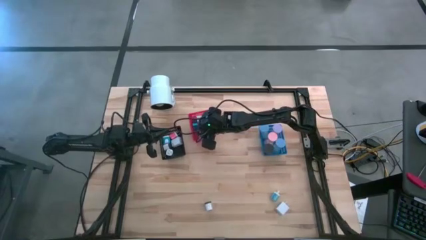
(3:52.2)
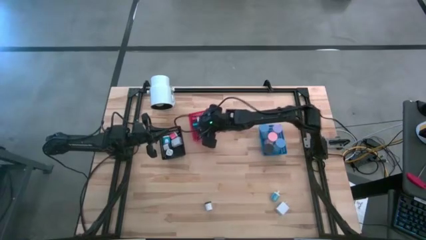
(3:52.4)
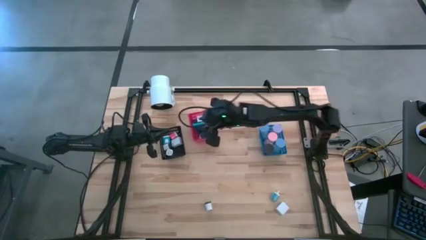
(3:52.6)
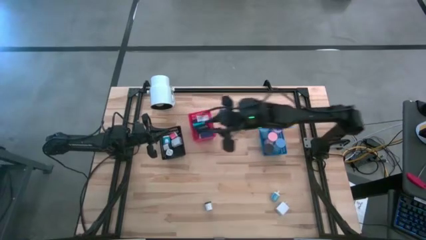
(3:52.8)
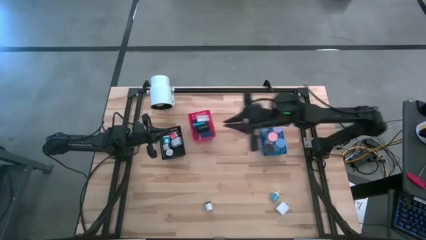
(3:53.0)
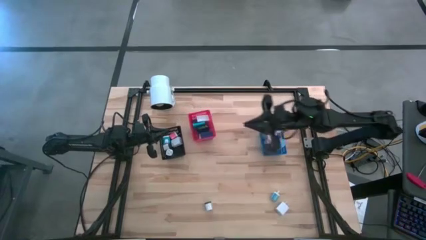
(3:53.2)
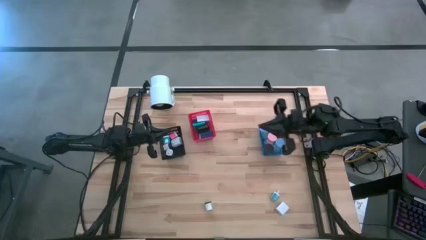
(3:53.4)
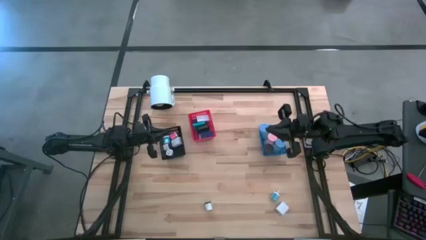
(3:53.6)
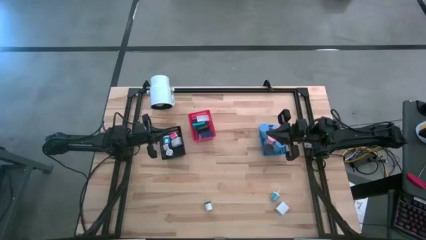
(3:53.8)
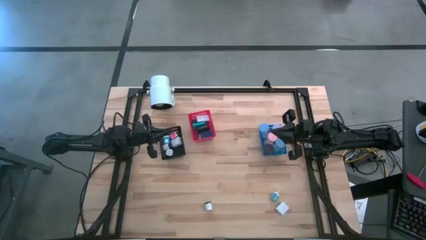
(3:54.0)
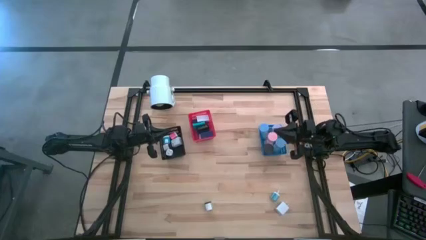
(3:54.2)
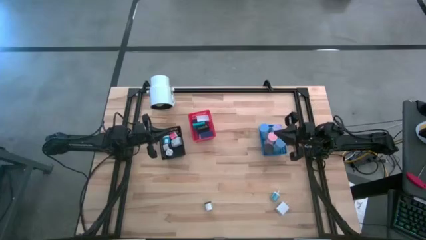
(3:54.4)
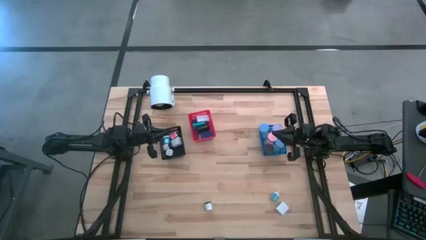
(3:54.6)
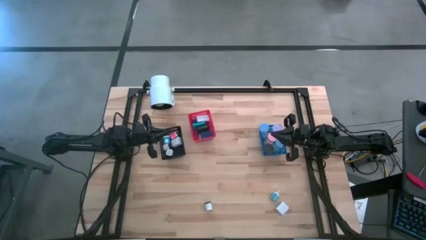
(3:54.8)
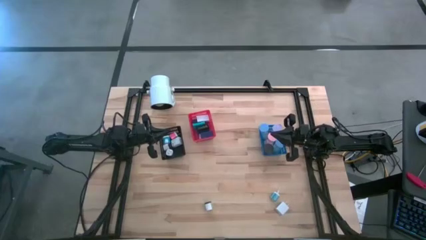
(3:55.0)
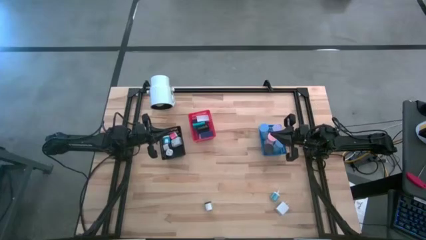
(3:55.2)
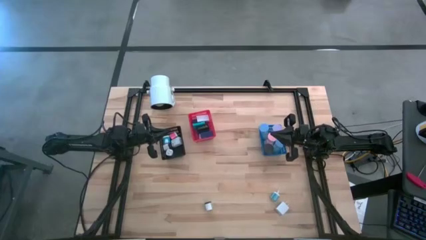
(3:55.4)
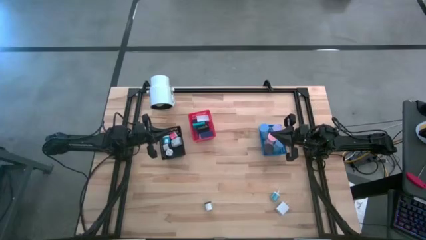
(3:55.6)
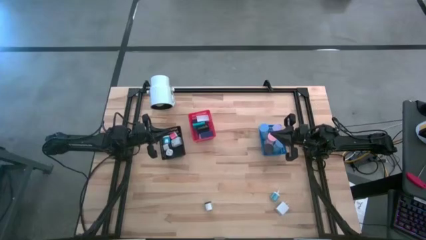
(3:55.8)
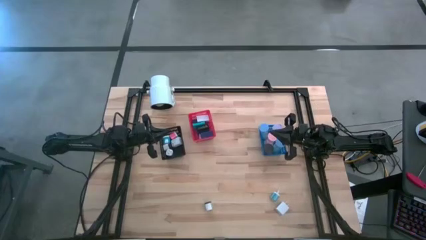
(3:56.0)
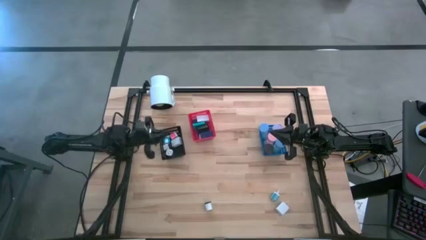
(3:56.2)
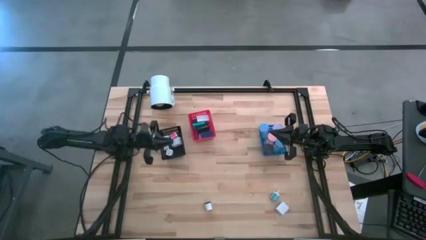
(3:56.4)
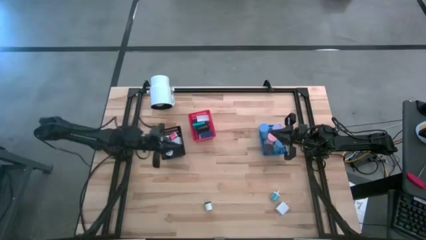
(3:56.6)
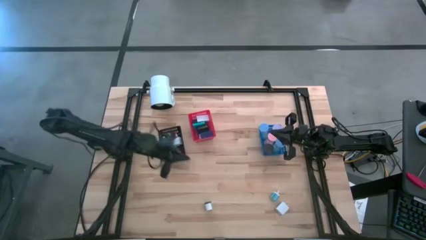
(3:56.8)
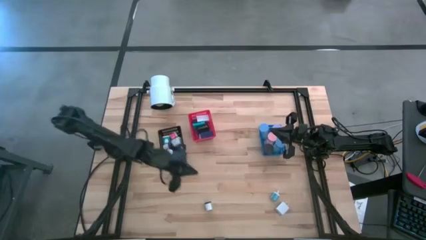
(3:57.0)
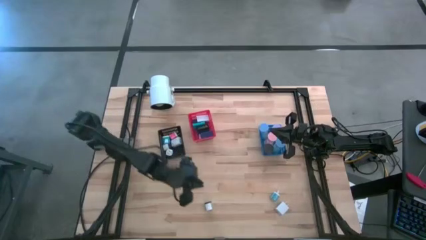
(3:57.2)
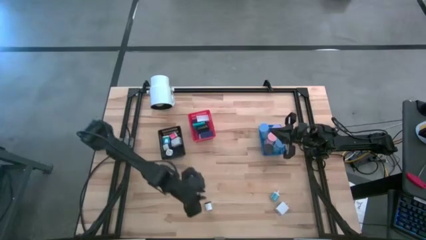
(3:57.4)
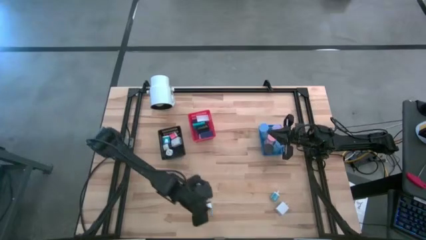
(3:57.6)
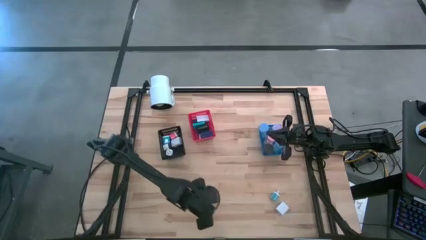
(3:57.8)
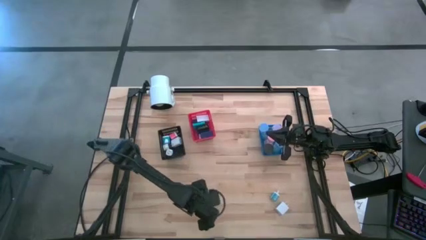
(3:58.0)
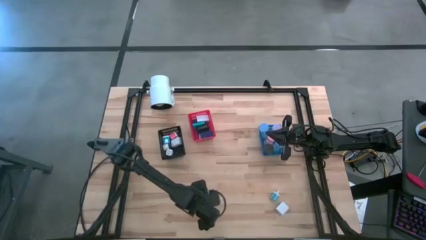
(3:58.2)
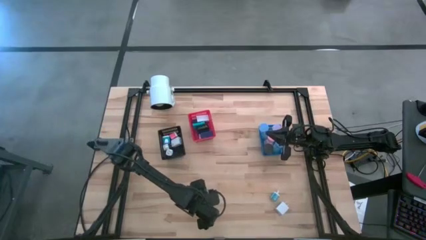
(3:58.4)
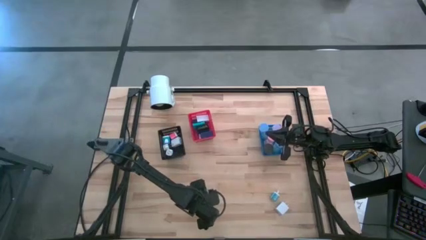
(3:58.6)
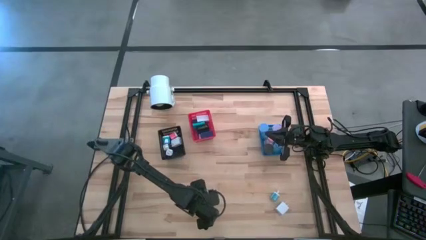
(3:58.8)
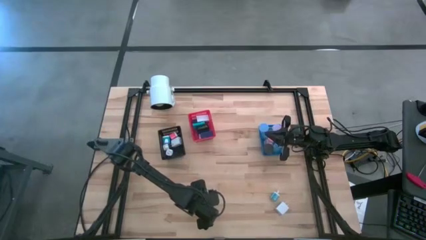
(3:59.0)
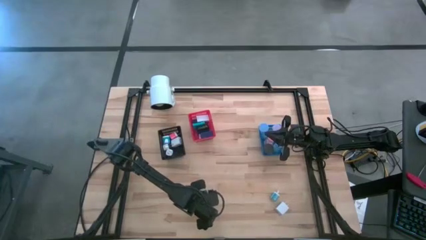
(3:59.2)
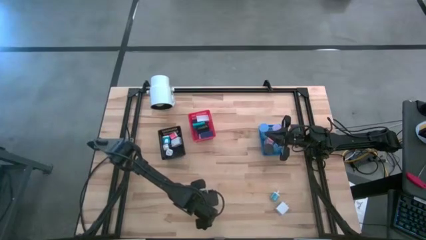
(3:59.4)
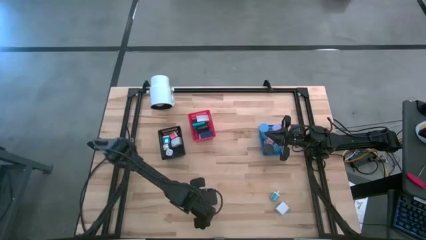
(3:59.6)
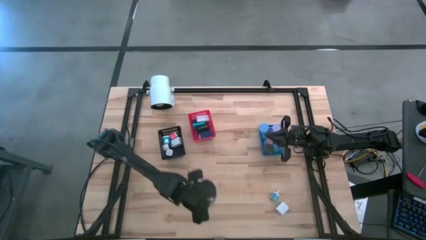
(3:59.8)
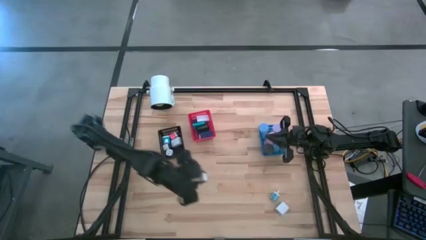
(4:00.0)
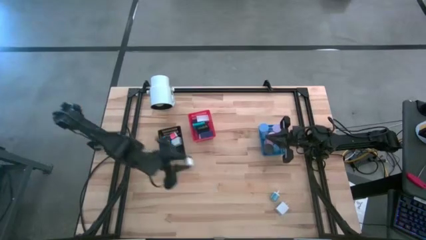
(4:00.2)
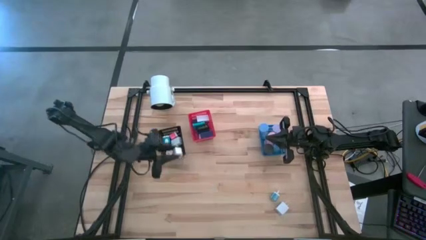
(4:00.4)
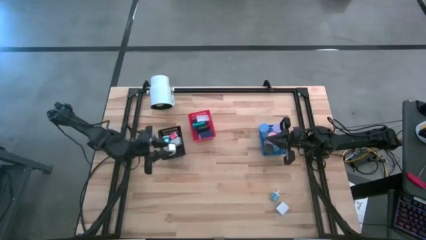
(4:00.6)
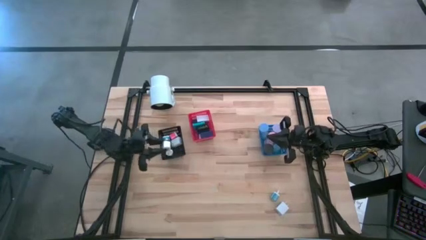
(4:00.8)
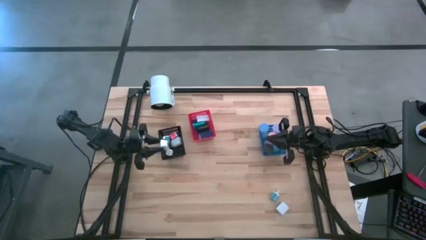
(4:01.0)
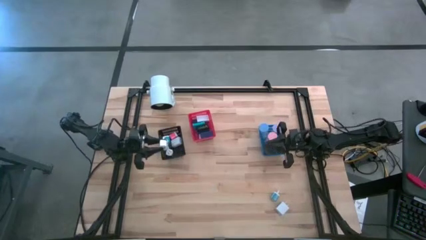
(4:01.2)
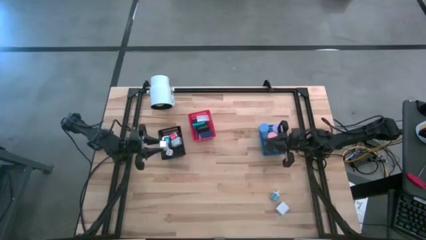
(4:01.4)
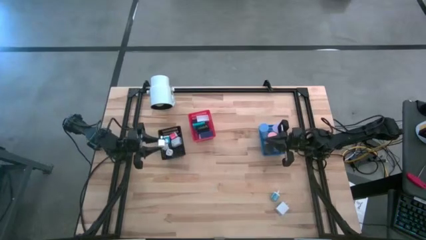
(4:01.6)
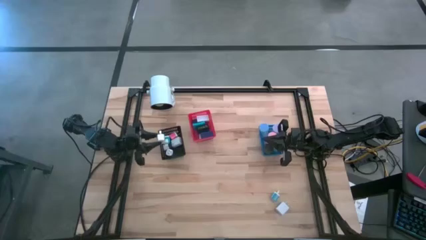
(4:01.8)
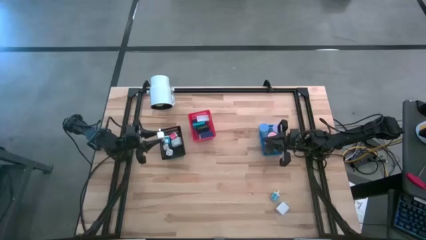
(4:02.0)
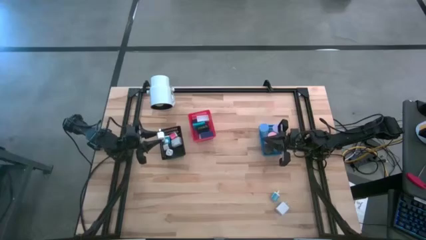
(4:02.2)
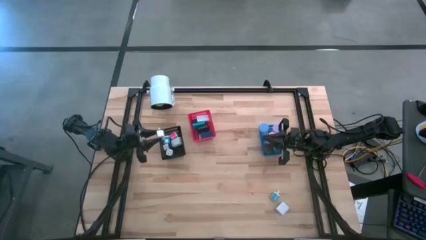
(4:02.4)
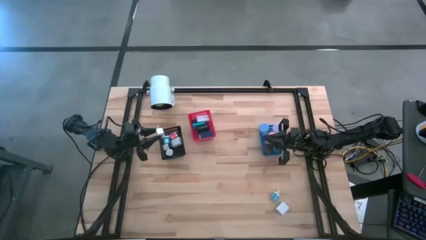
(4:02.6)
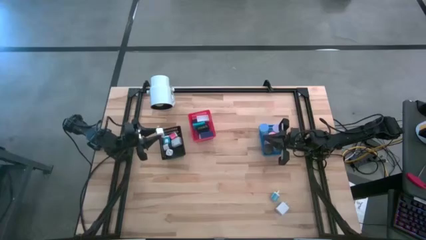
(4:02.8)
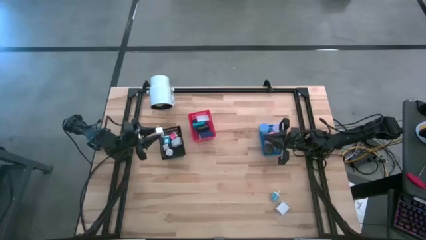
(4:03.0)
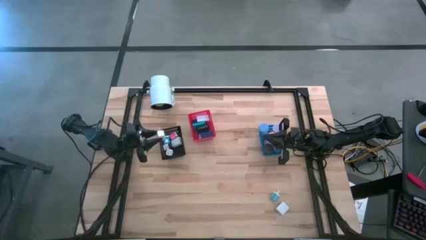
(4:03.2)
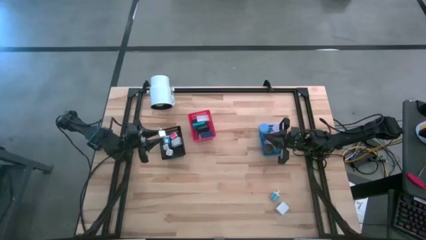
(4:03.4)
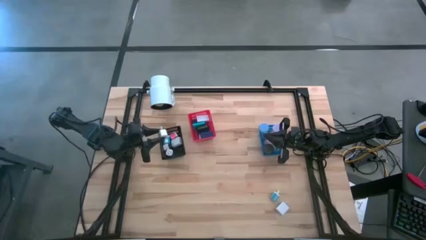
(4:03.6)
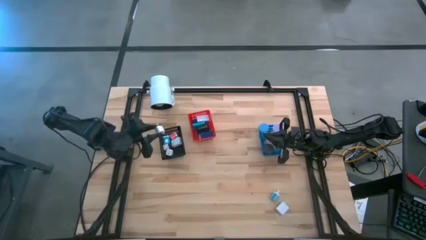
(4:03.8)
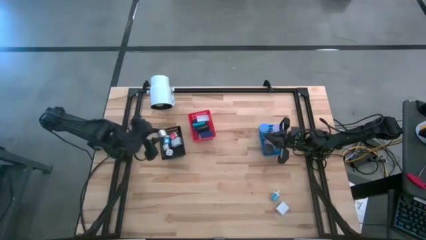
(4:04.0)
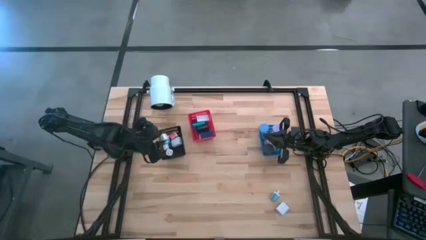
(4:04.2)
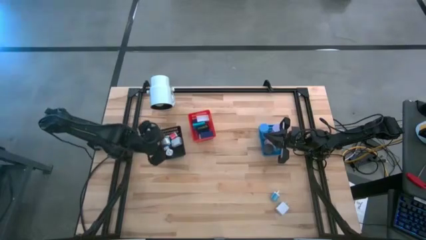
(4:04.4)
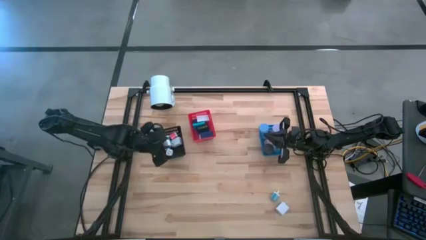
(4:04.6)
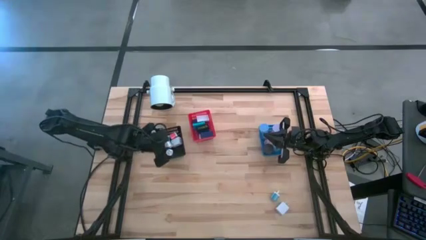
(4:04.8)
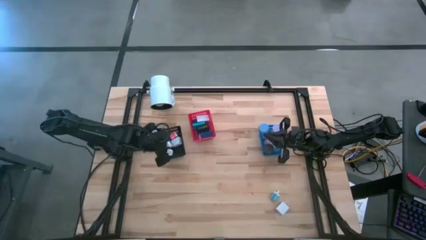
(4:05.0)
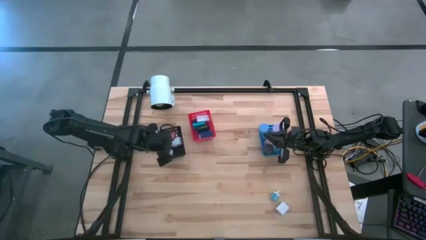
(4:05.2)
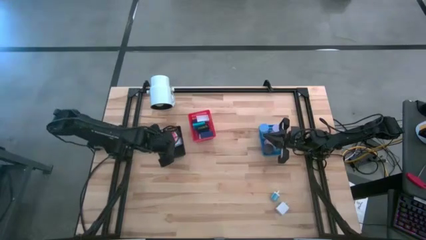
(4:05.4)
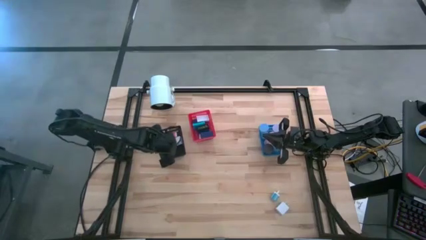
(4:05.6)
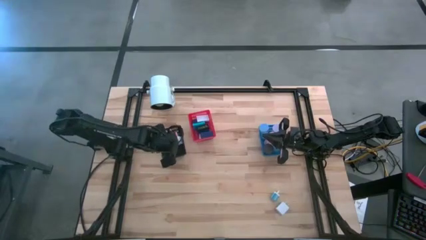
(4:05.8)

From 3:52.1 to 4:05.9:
Task: Pick & Place Office items
Put the white black charger adapter into the black bin

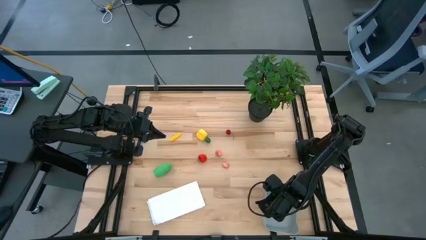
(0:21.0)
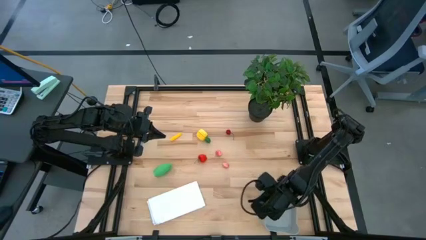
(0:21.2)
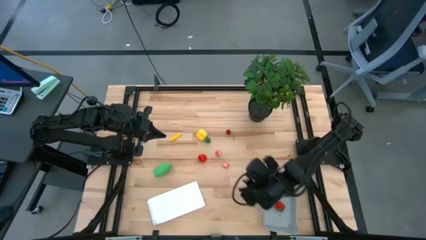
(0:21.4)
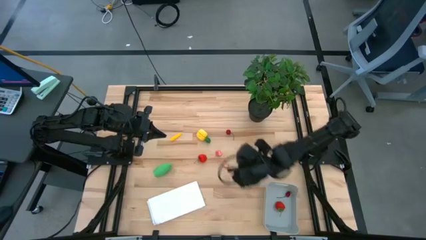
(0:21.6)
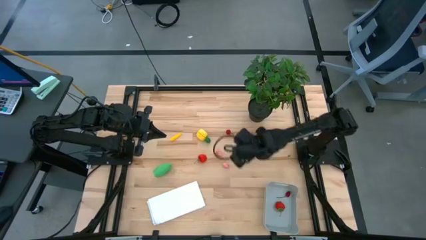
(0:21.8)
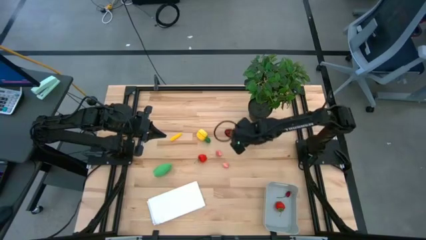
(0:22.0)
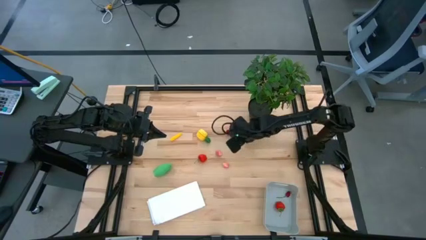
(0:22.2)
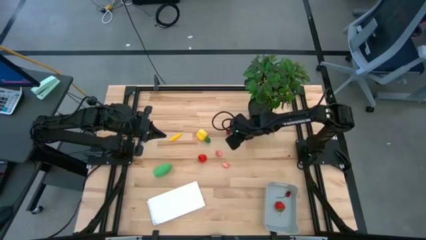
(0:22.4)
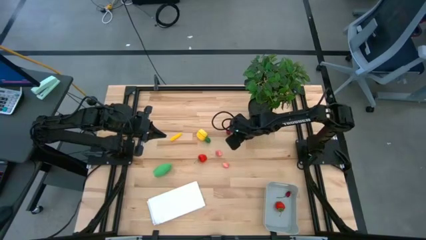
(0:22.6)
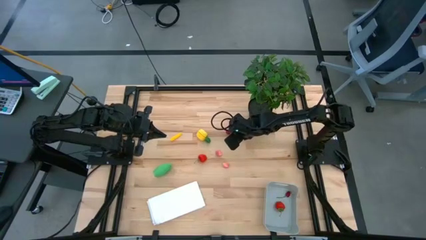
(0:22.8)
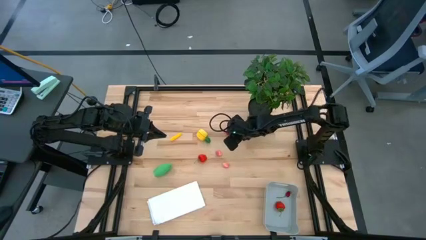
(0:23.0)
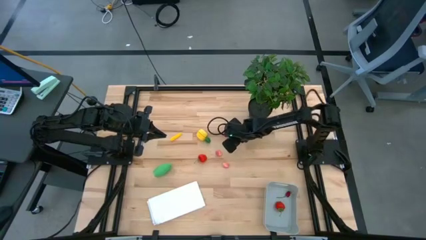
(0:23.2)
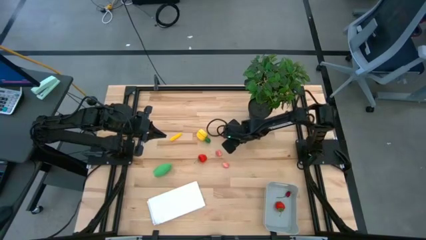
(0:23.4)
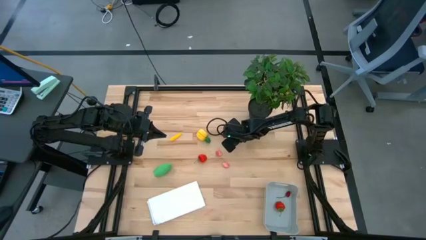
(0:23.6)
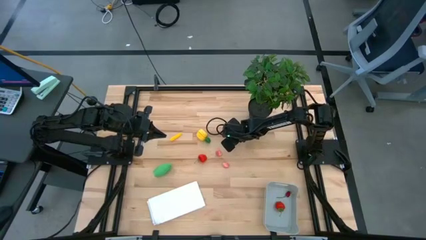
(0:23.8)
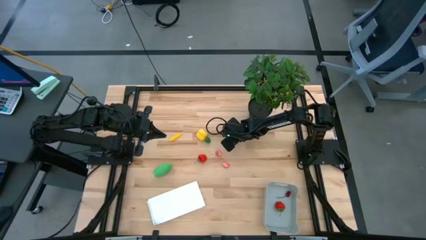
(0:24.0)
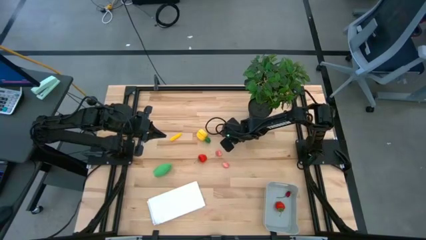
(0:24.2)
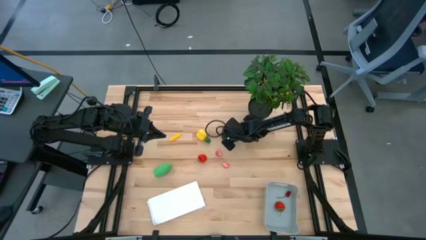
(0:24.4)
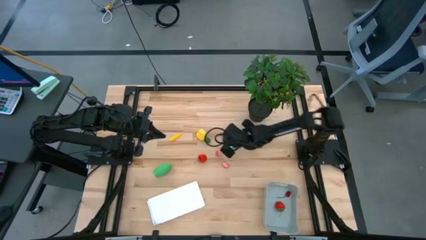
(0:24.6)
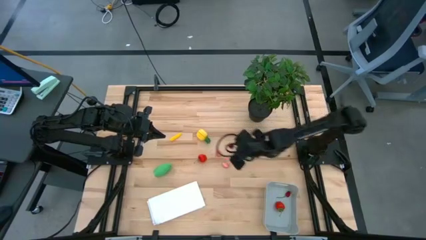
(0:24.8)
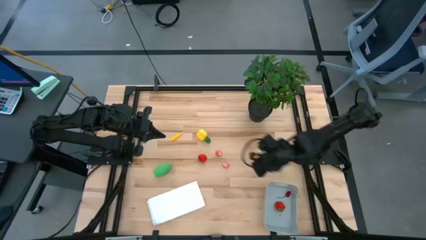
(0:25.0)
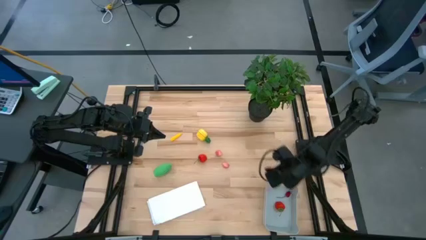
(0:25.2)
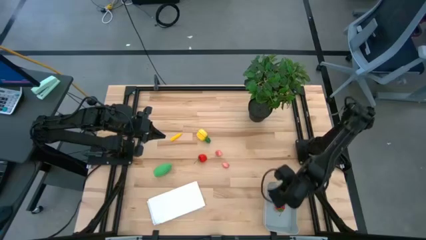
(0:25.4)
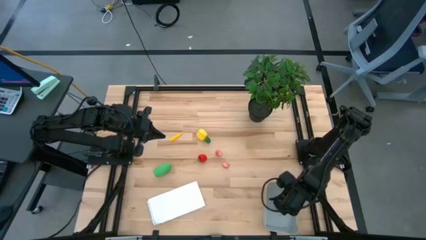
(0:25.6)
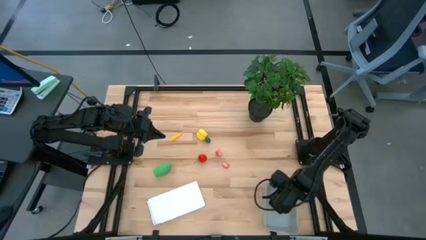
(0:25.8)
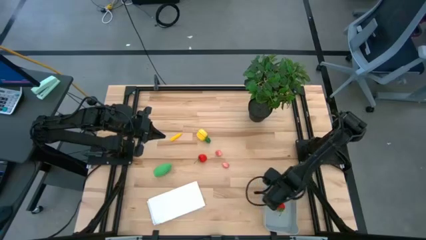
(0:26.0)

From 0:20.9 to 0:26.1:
Task: Pick and placing Produce into tupperware
Put the red cherry into the gray bin
